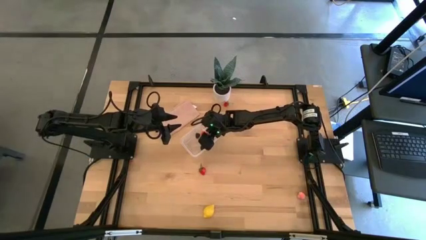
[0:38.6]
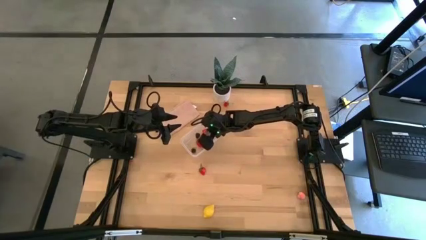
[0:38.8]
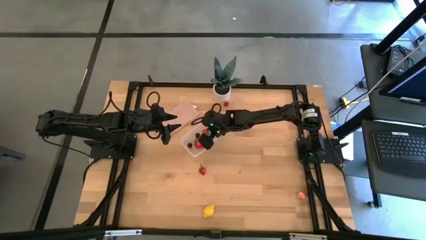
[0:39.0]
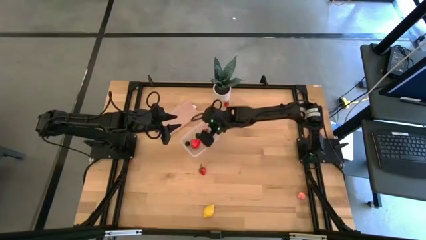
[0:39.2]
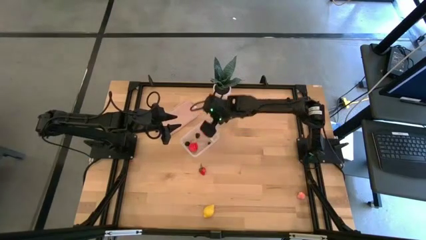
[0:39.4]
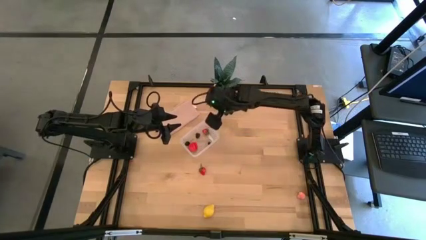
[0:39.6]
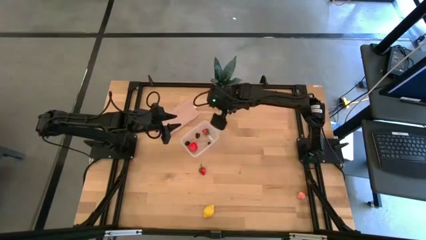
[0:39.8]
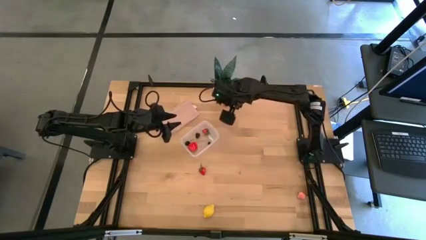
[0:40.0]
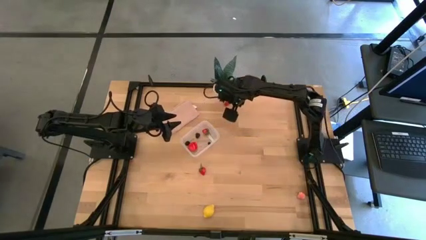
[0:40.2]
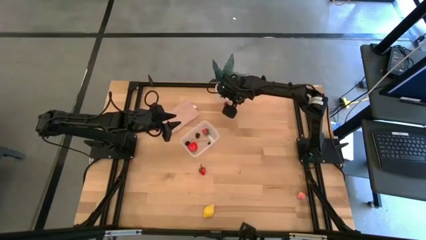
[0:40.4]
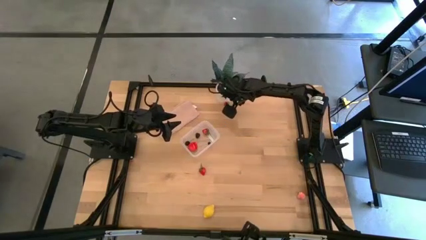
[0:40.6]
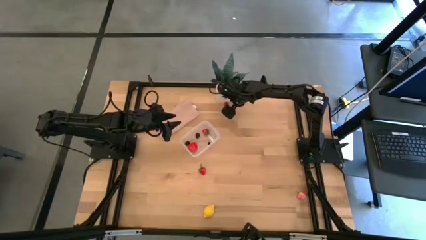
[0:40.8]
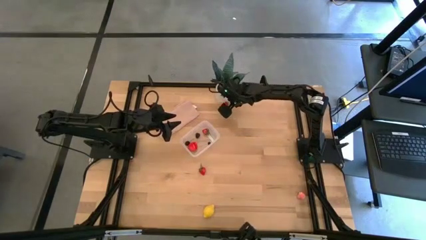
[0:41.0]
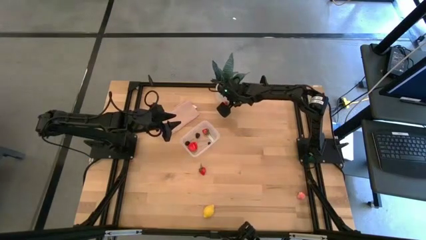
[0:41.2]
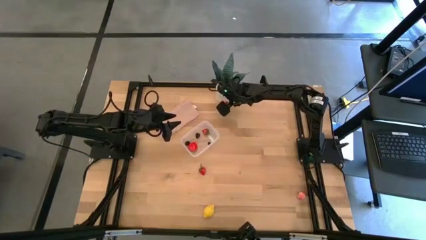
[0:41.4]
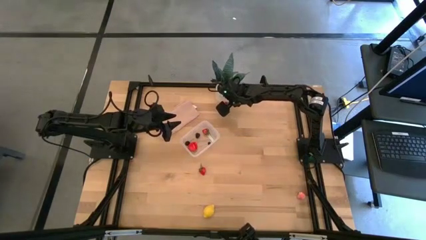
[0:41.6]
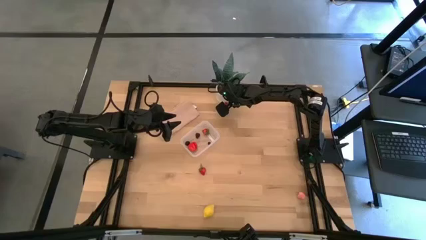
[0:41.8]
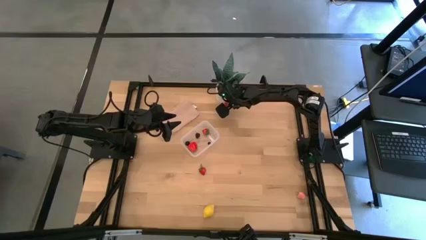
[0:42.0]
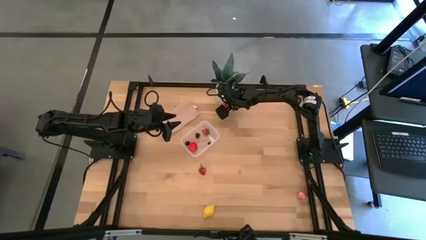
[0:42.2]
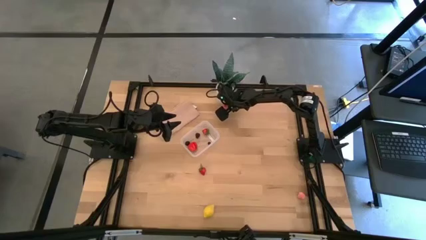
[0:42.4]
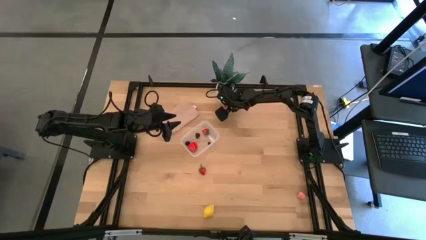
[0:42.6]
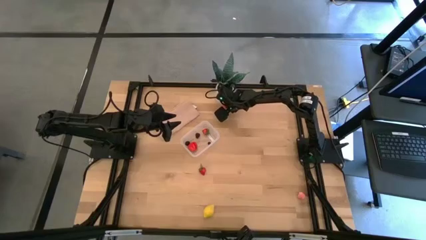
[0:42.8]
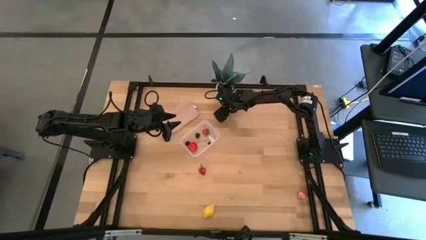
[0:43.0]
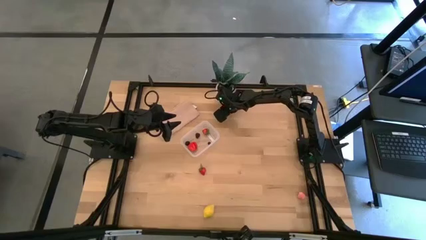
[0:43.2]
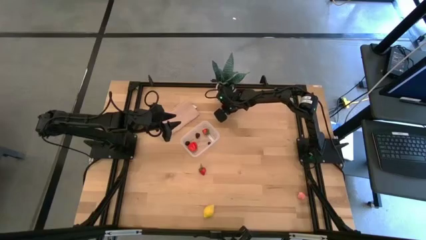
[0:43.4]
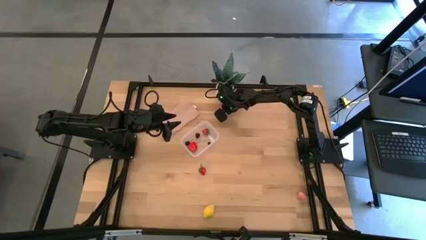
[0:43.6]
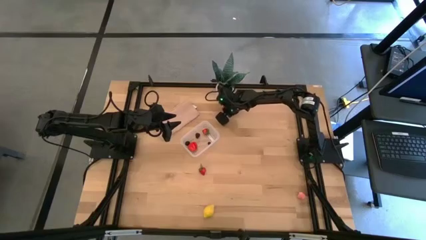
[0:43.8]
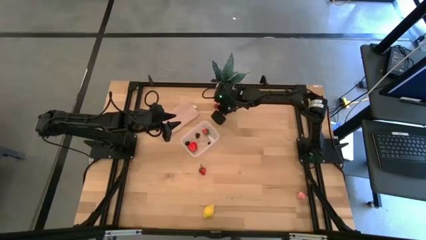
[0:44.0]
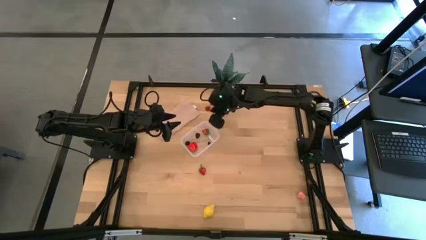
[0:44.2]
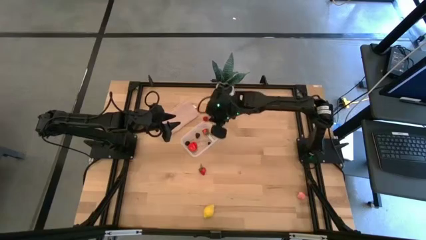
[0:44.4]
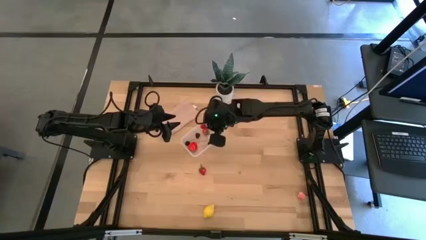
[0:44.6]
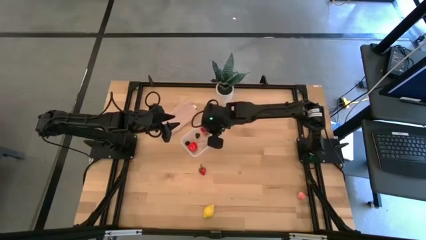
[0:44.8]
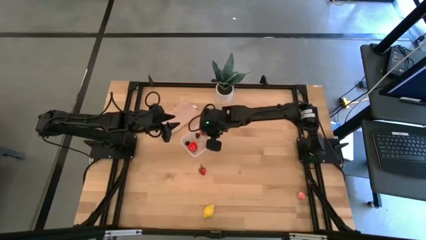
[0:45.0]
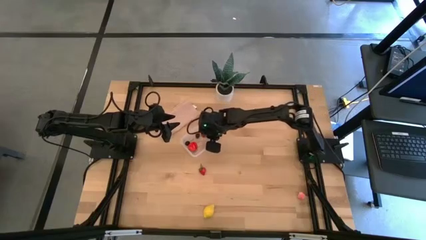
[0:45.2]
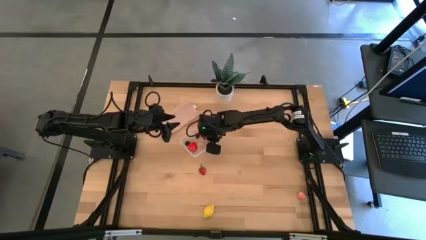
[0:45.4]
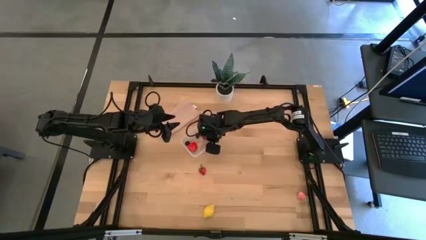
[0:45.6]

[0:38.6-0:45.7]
Task: Pick and placing Produce into tupperware
Put the top red strawberry into the transparent bin

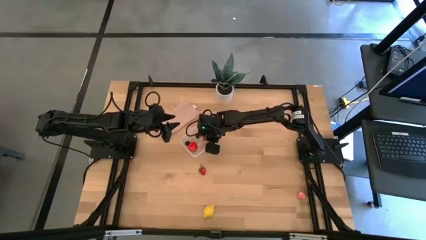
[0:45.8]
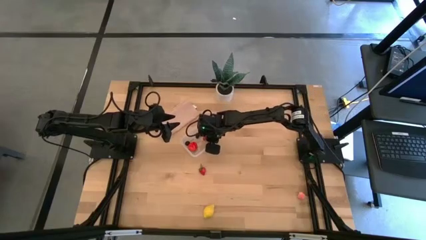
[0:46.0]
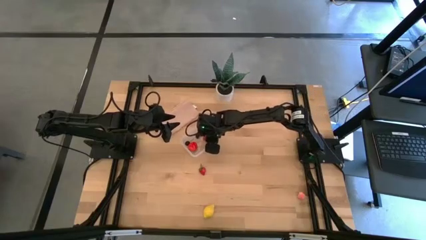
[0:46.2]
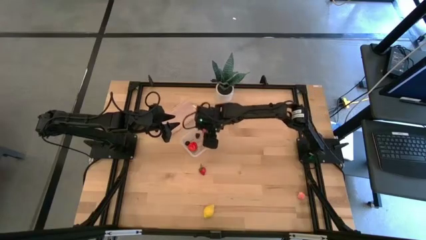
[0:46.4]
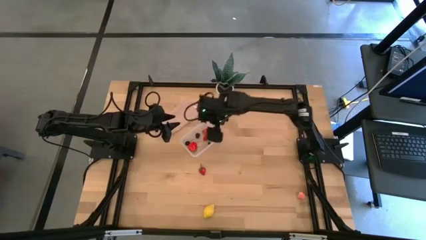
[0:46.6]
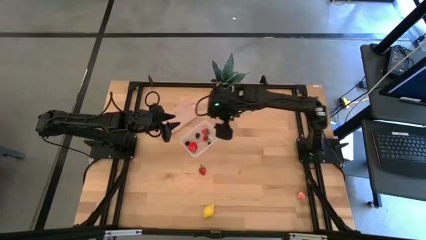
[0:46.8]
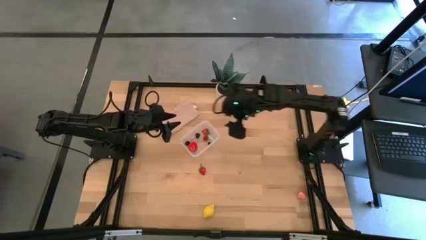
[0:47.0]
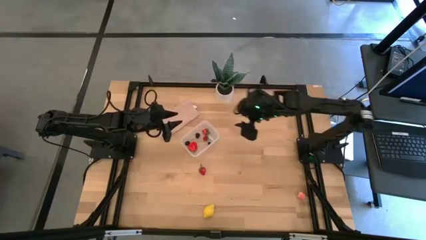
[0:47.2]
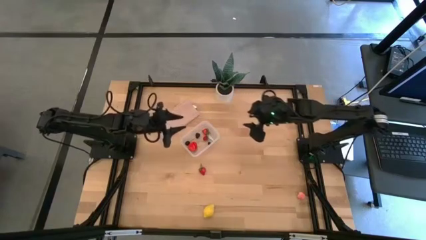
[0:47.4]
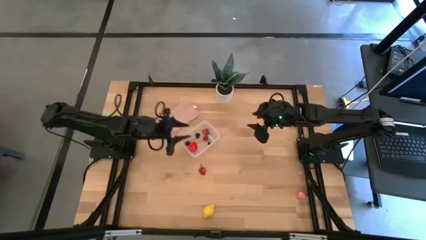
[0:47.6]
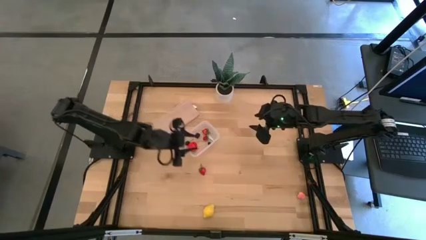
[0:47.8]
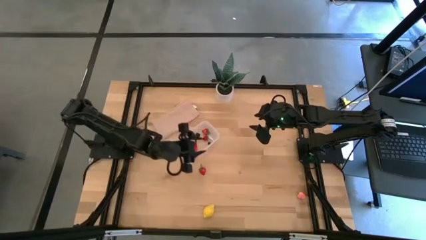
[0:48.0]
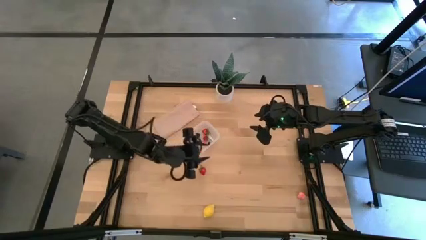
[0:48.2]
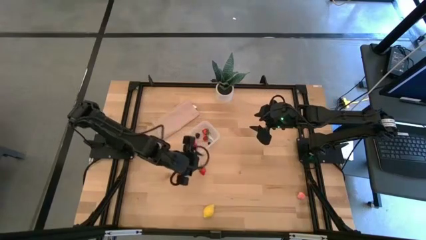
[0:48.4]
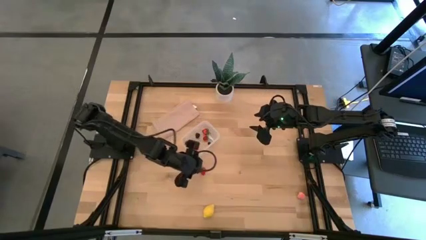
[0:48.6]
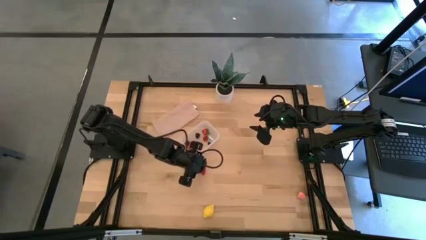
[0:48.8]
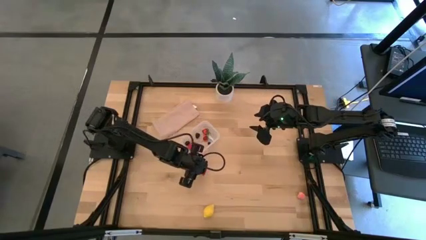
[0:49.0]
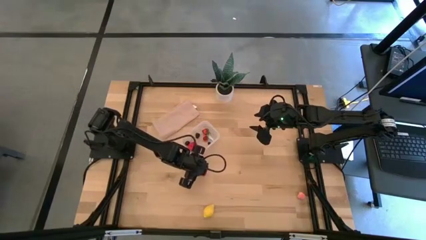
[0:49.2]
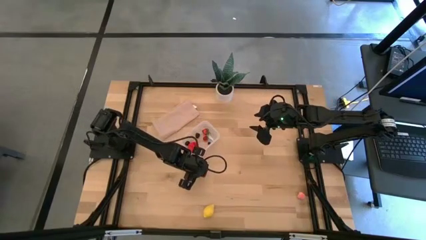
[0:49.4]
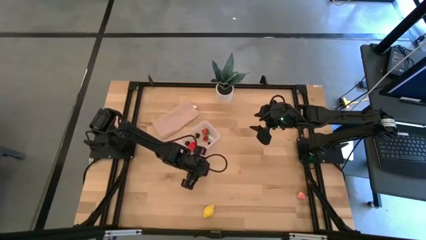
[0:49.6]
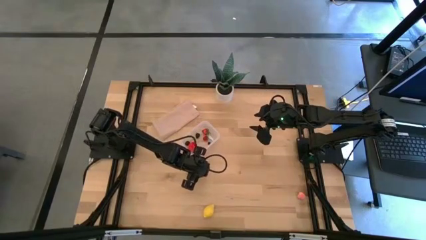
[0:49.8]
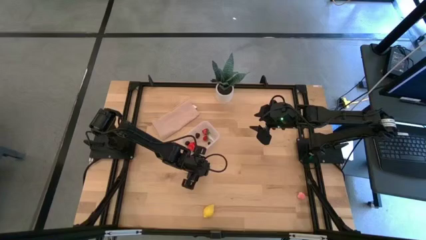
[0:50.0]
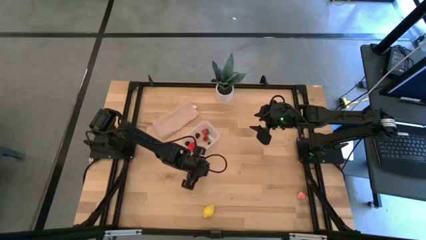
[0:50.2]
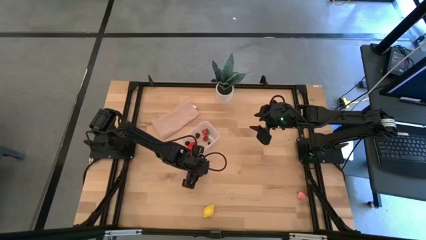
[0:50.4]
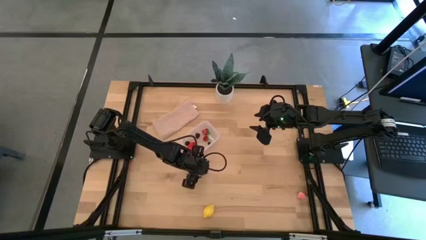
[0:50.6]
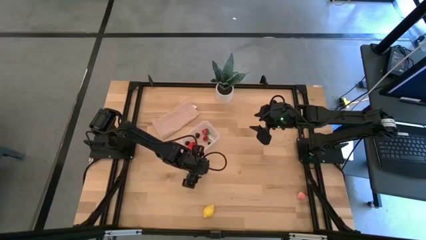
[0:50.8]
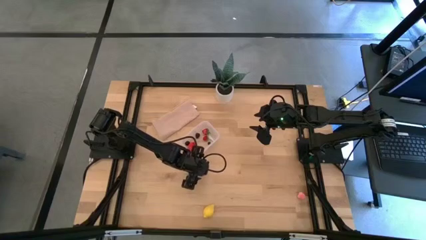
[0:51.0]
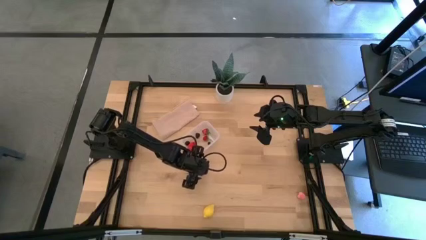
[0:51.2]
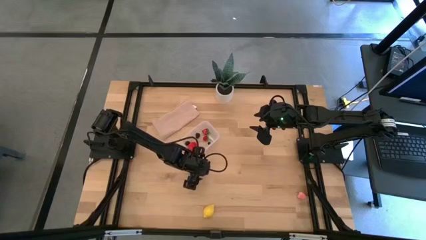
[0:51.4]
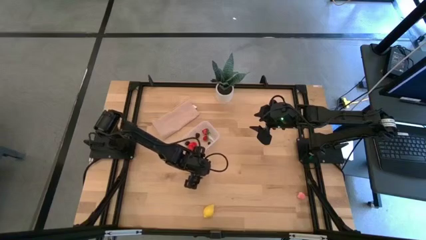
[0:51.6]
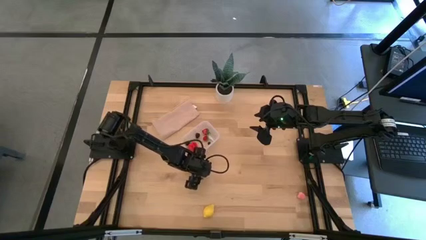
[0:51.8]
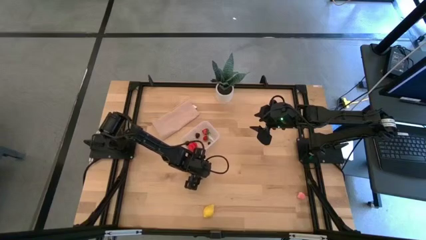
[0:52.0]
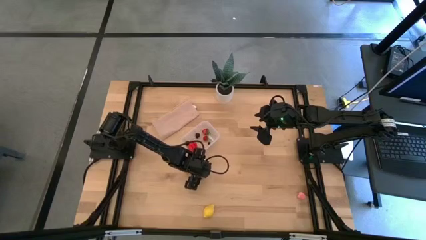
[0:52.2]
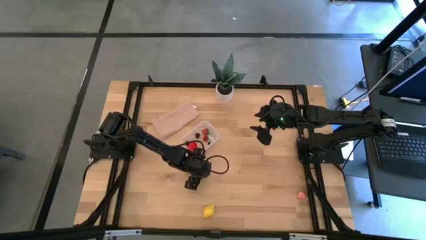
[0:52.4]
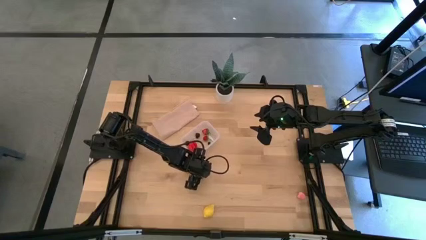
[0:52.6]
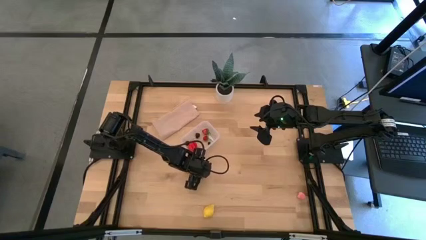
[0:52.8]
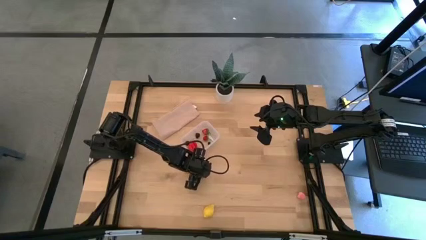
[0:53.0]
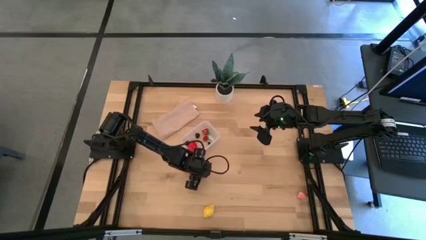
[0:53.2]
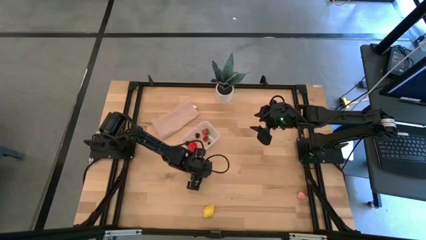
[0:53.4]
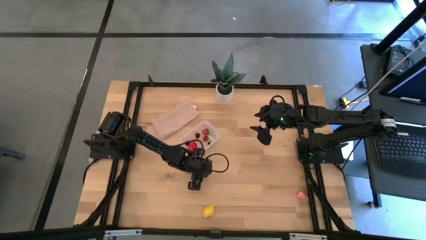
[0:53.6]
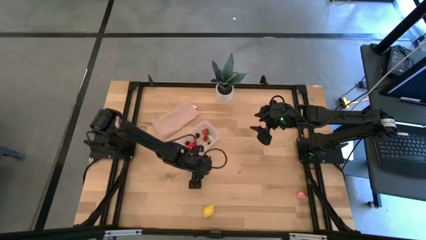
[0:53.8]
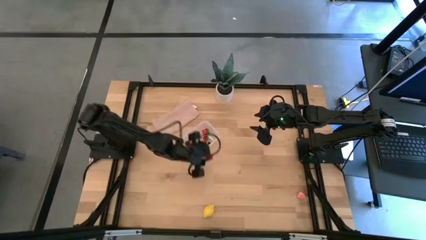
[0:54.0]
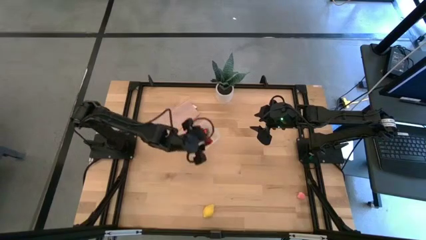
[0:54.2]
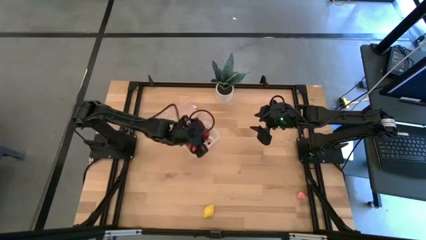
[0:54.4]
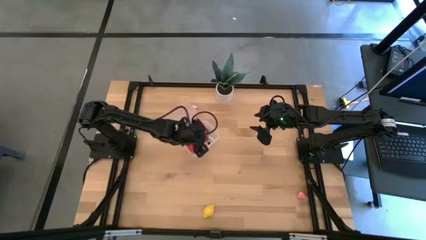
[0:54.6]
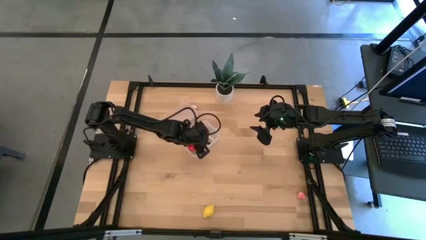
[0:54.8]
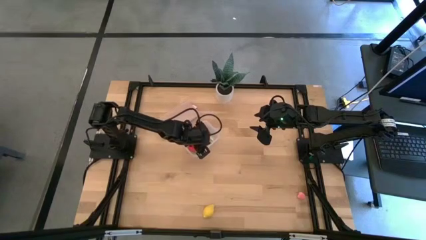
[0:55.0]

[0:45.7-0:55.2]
Put the red strawberry into the transparent bin
